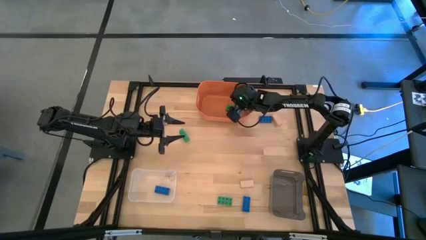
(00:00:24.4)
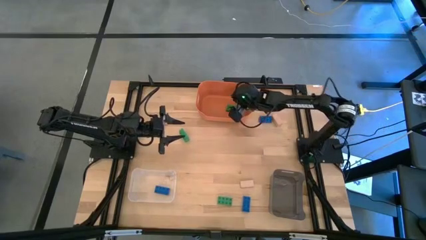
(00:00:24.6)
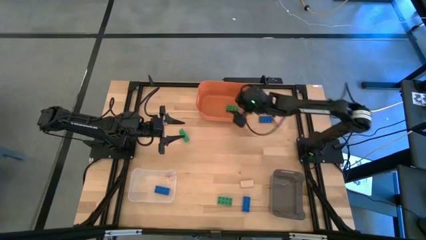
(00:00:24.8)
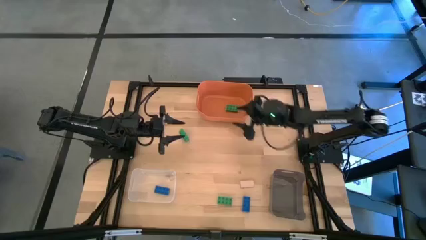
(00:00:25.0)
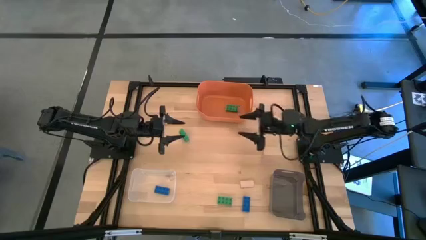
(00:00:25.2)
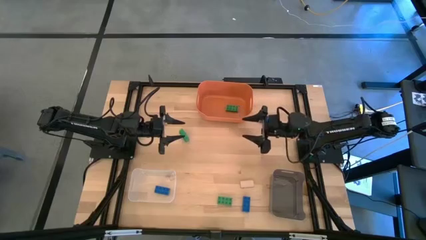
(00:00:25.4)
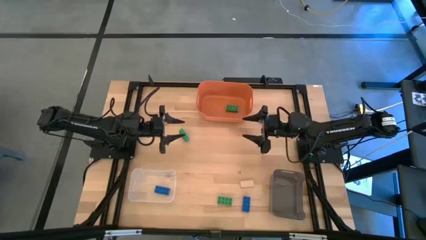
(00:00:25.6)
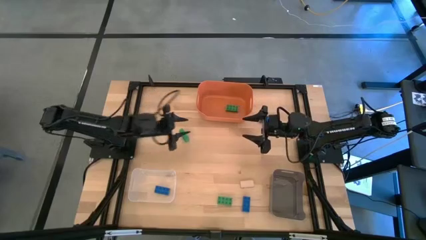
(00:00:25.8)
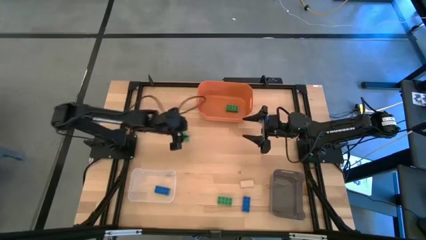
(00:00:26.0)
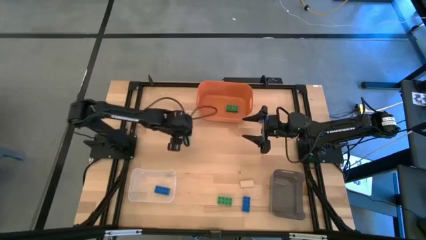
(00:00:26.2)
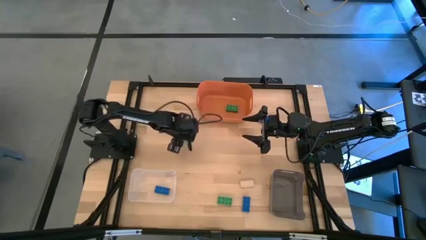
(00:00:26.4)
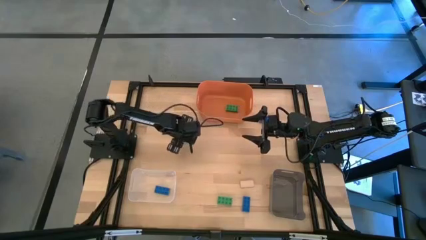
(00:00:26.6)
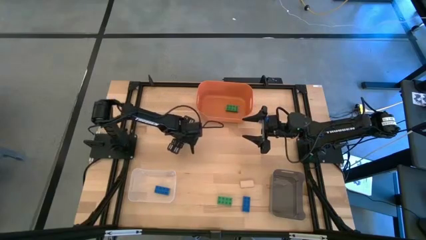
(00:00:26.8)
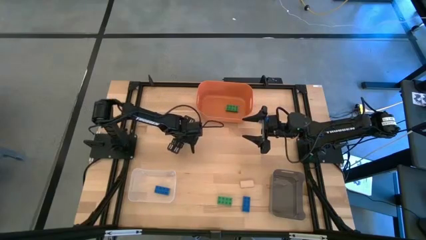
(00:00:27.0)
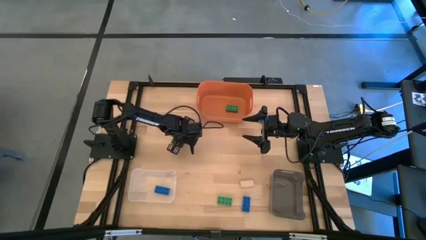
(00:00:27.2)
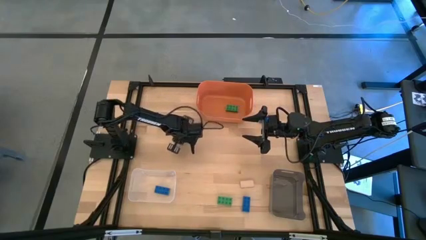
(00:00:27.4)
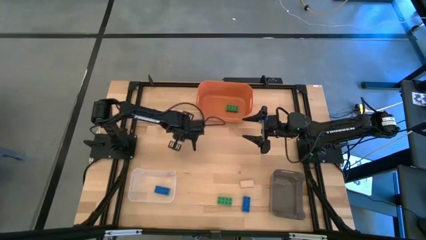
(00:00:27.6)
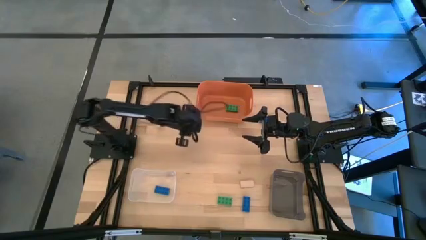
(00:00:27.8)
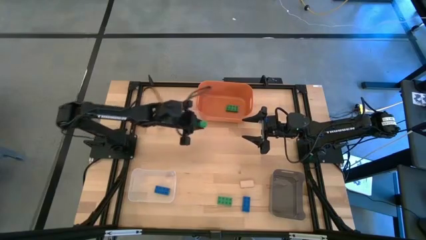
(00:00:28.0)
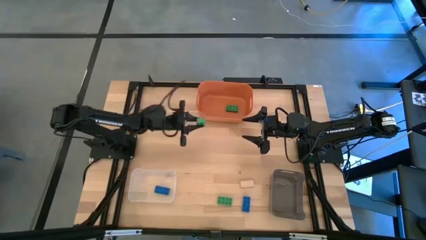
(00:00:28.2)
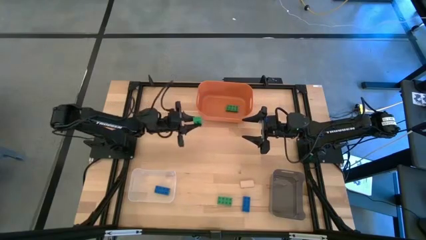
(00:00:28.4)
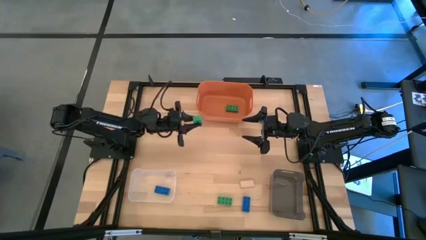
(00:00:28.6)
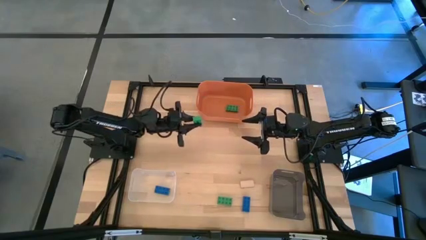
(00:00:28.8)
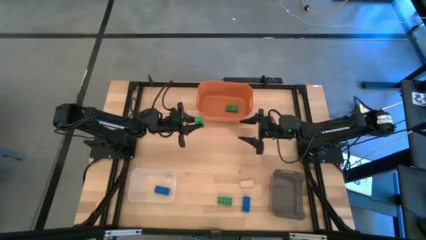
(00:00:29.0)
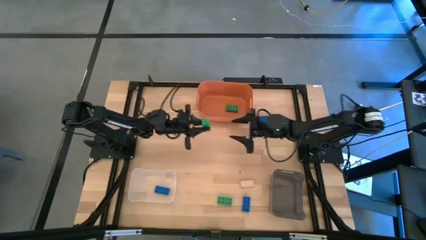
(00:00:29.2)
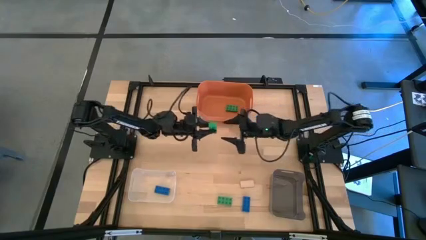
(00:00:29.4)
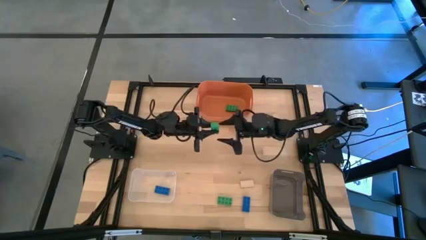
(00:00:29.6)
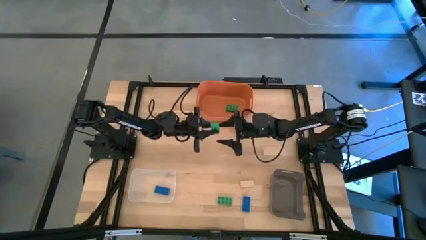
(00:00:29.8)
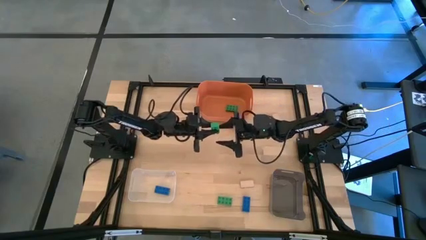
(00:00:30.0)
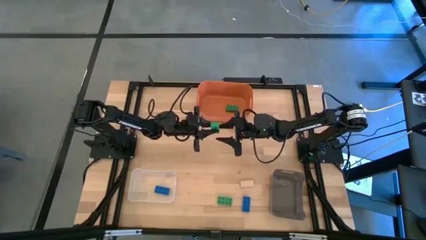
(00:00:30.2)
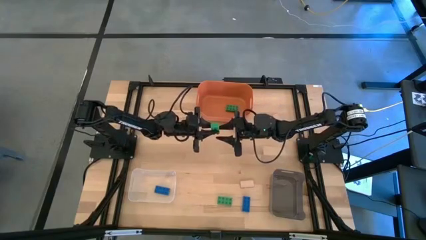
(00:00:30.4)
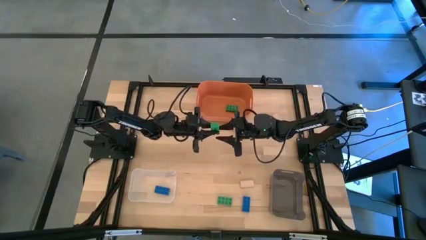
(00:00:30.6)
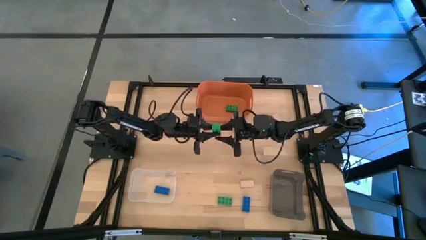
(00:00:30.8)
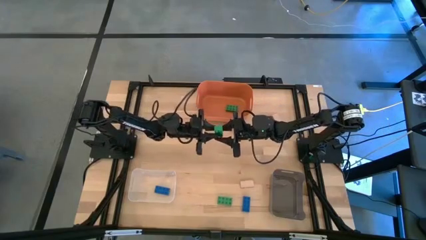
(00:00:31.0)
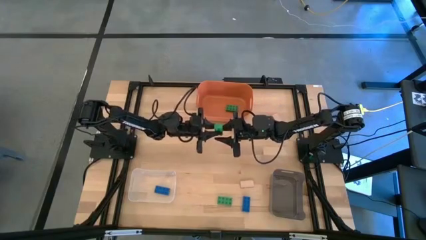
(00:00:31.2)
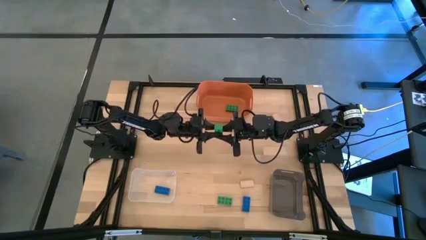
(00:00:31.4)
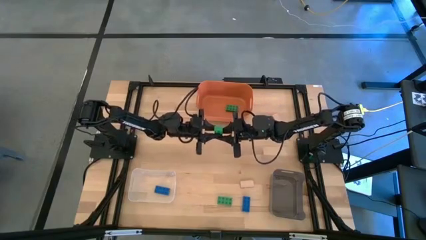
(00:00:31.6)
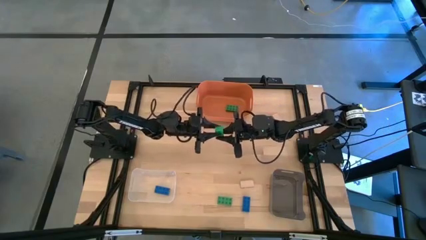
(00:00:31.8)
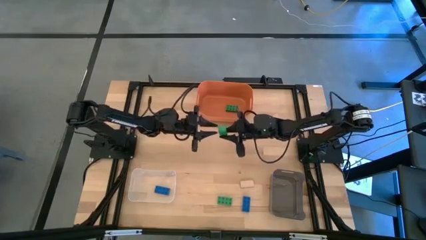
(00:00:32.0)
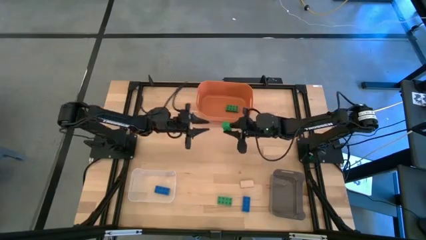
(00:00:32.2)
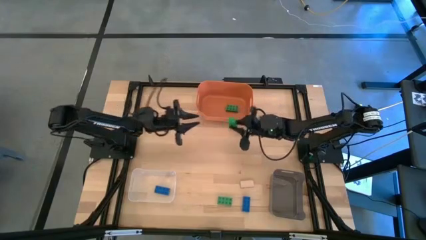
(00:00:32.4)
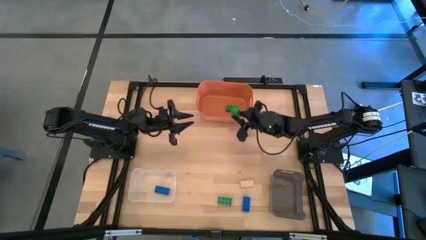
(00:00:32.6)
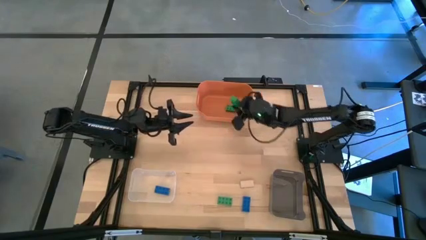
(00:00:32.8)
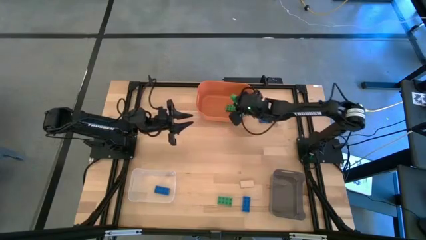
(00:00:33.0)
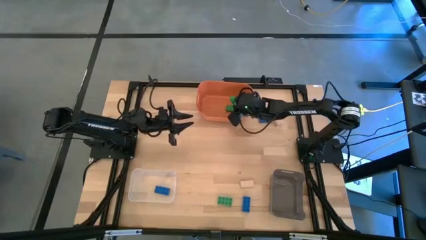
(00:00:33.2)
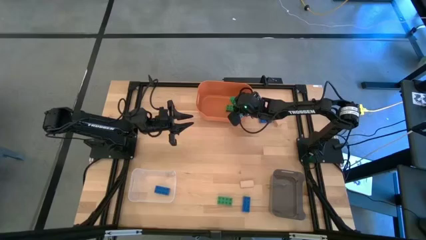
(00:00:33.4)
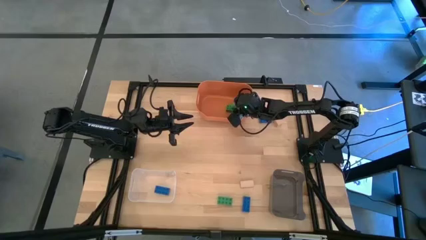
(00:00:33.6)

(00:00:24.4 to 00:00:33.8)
Task: Sort & place blocks by color
Put the top 8 stud green game piece into the orange bin

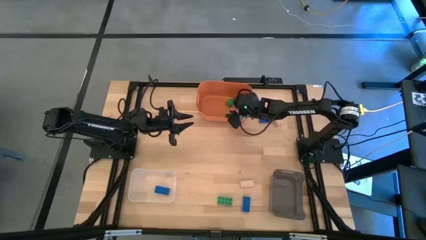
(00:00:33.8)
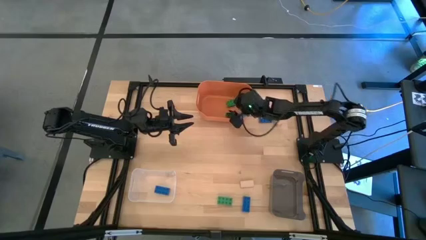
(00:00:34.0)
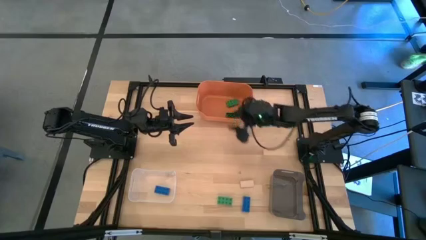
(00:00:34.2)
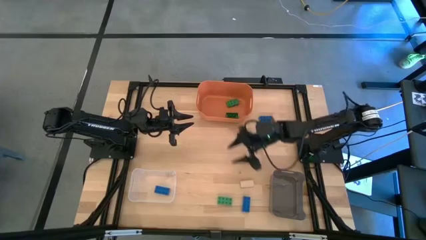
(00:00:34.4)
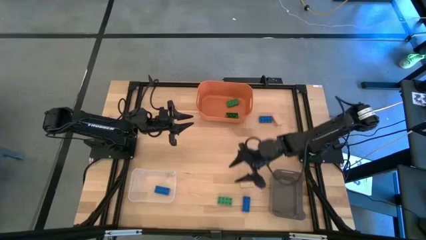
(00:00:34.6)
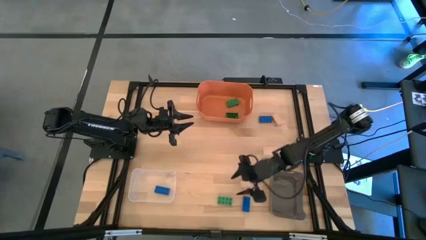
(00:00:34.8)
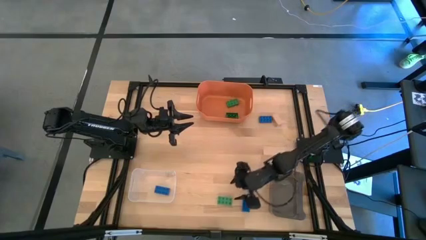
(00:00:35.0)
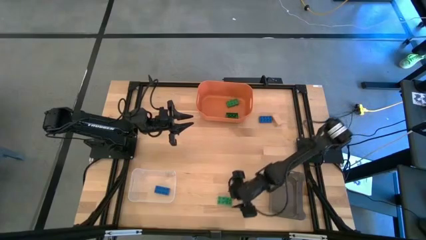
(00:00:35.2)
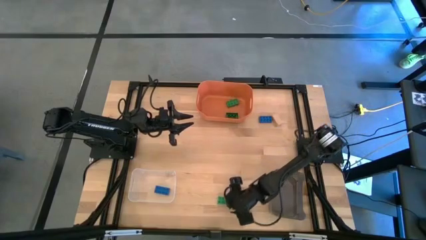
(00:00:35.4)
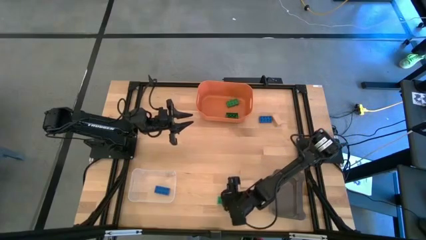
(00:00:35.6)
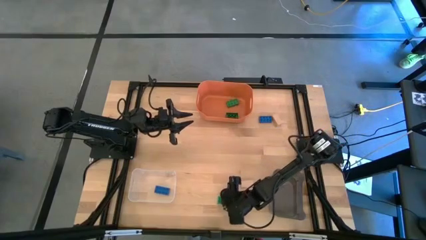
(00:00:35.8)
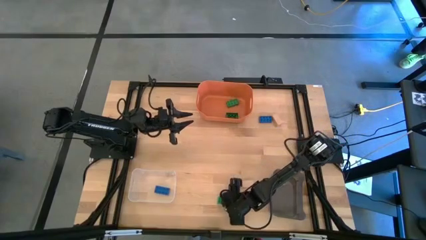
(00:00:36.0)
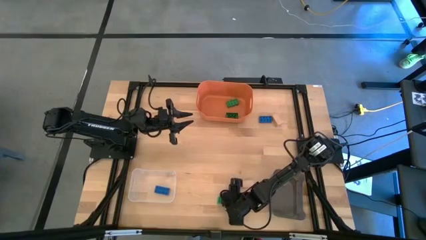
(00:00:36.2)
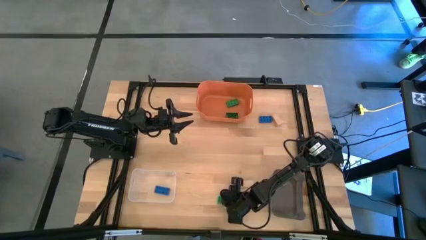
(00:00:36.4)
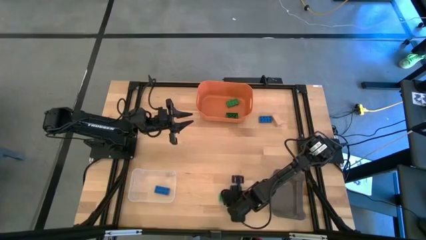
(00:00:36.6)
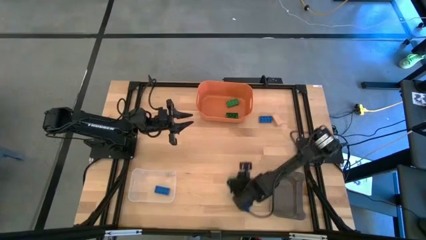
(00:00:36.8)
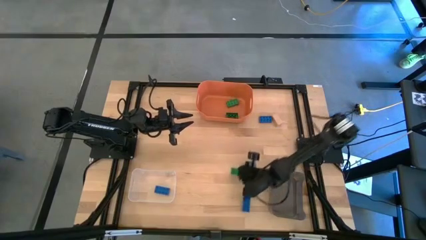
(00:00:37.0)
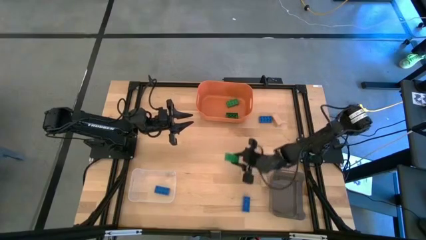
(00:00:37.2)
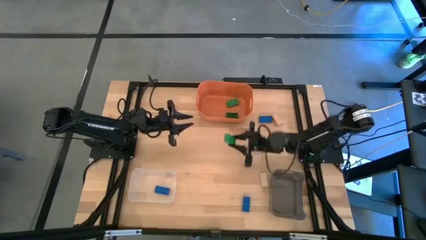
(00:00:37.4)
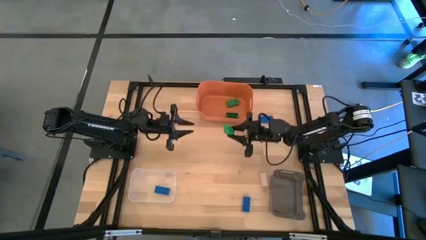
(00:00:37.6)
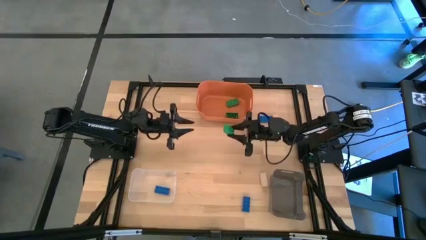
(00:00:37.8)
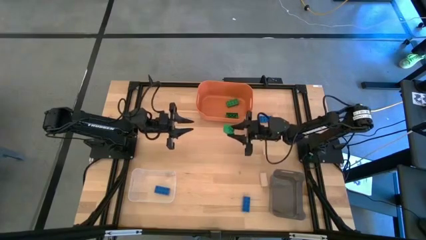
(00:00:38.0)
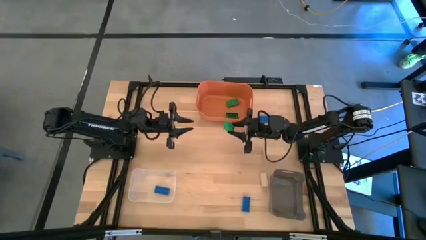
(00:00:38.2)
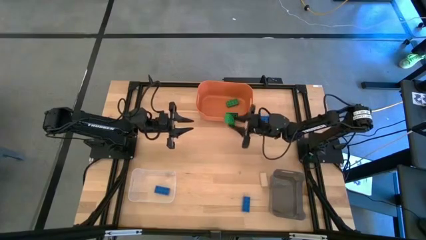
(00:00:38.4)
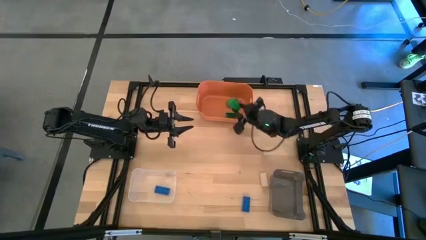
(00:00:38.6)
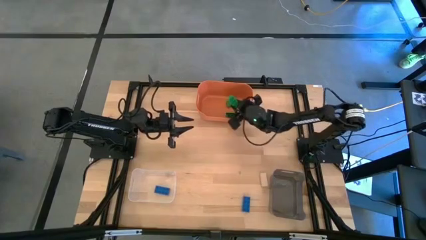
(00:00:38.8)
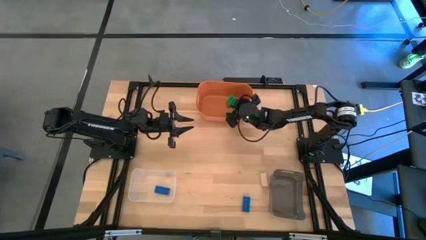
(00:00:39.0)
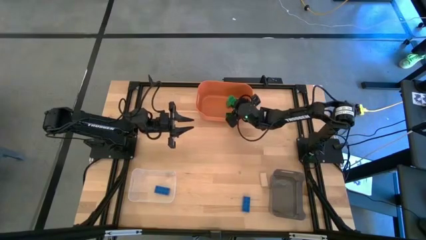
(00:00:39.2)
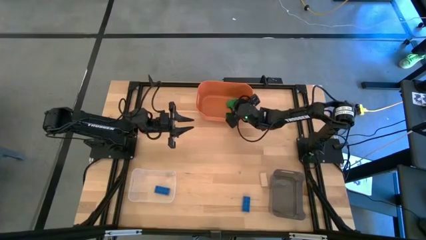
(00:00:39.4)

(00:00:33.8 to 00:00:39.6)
Put the green 8 stud game piece into the orange bin
